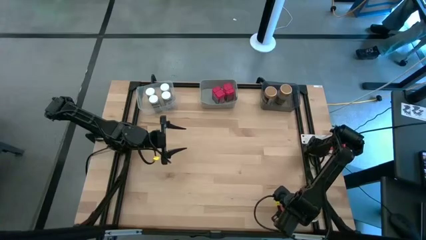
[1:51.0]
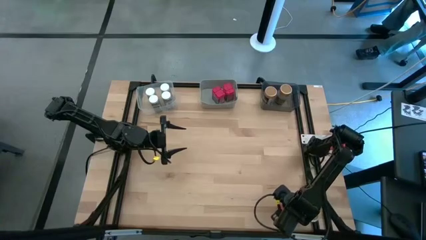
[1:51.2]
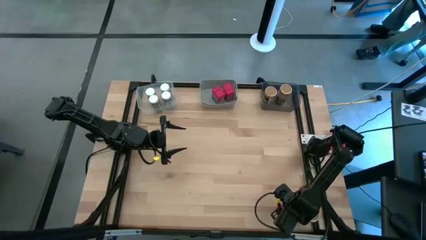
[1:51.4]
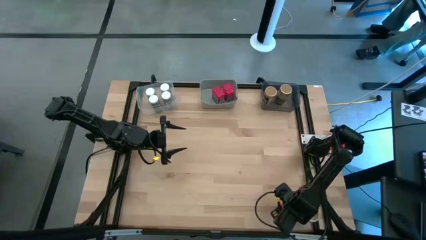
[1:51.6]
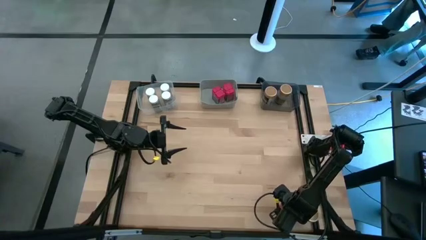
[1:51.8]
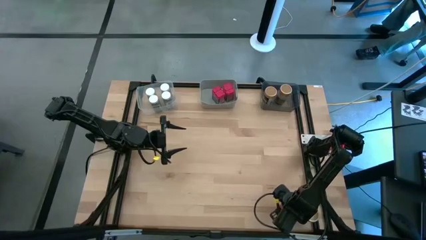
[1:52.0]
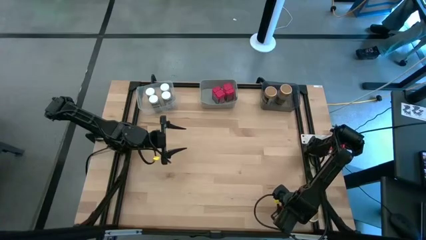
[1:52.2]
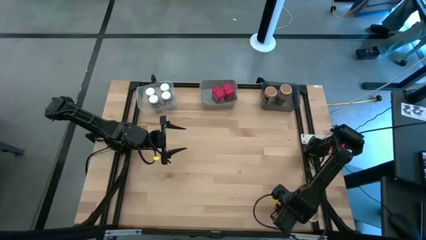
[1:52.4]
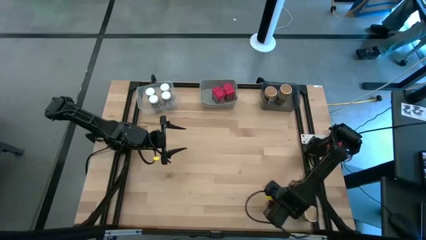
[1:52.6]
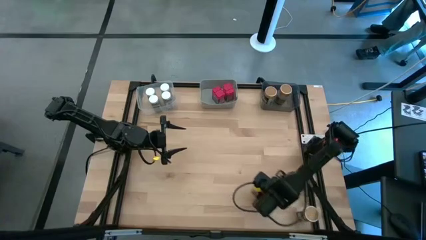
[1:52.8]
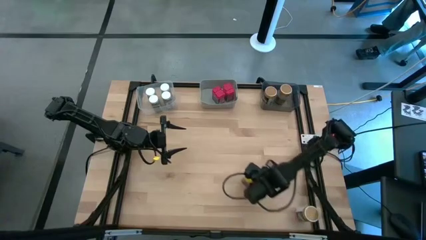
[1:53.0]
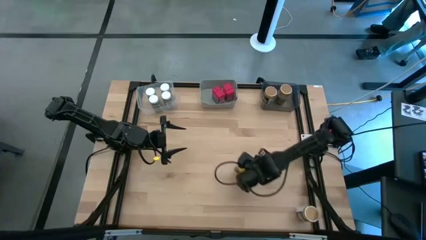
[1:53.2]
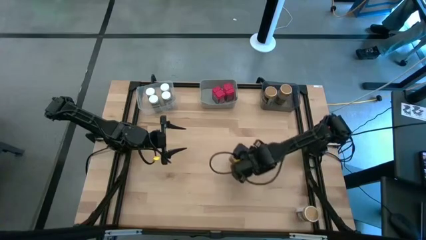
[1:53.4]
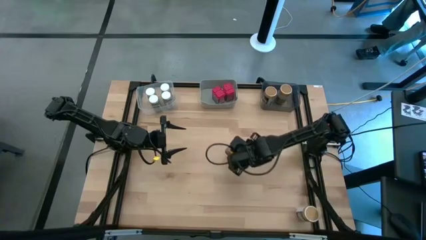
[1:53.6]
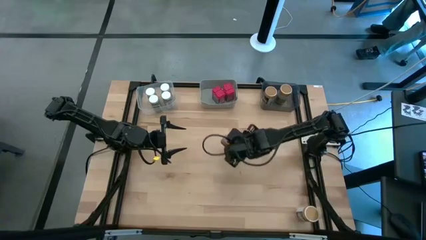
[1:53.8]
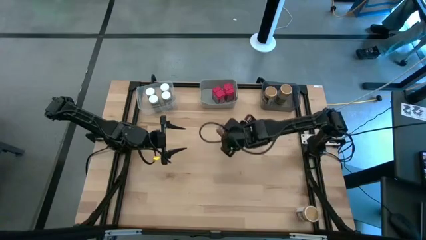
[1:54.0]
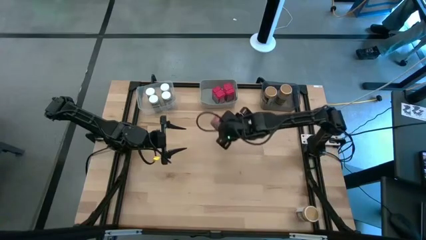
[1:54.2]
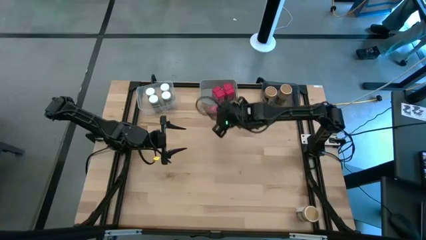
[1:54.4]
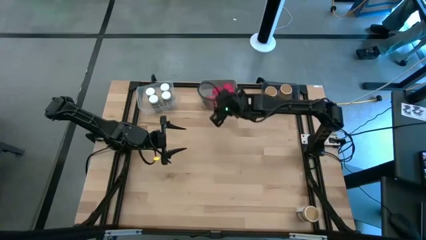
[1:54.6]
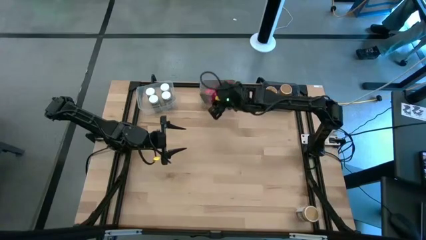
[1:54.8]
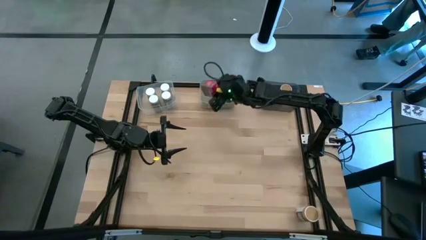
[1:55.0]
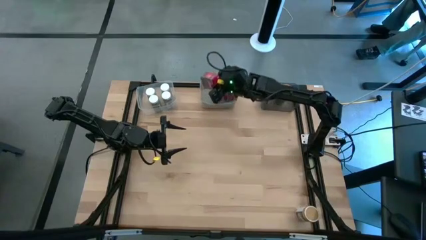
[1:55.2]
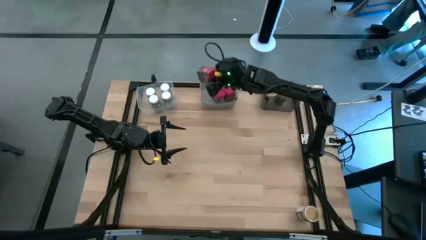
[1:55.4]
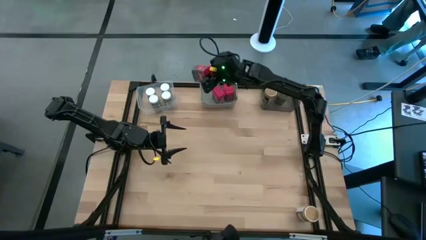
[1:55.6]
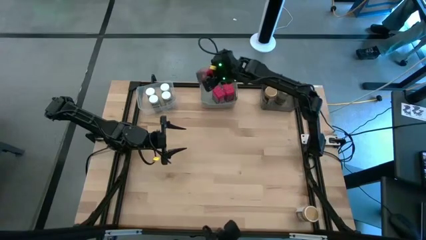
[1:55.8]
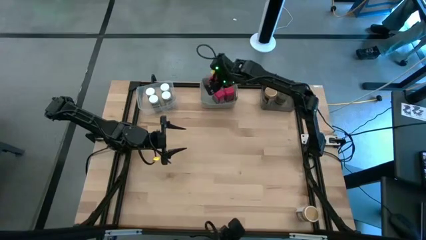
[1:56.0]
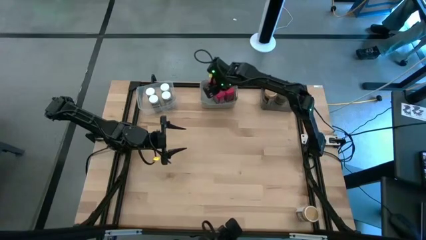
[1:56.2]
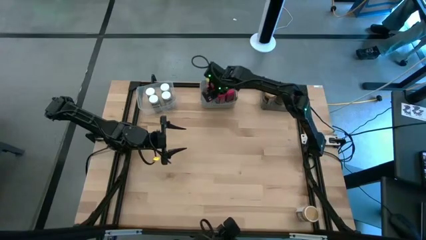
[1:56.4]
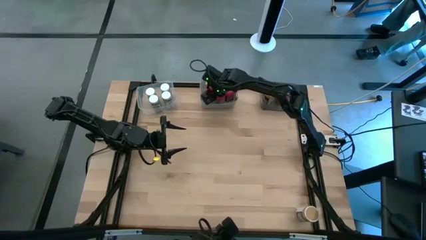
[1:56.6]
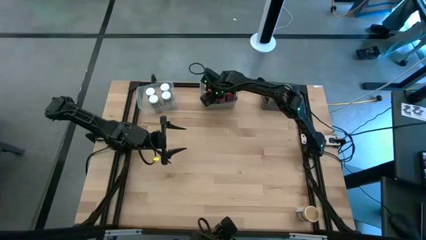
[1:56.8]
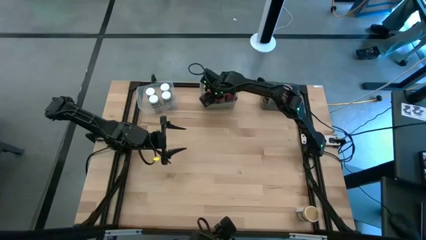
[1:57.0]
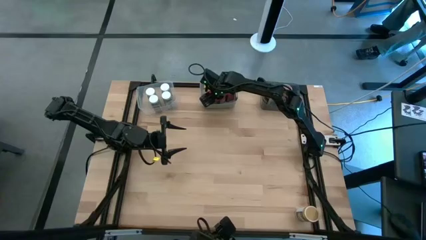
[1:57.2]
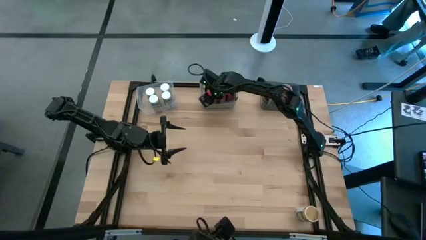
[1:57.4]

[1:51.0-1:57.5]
Task: Sort spices by type
Put the red seasoning can into the gray bin

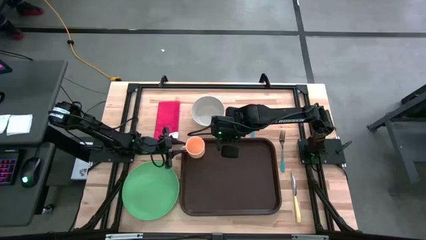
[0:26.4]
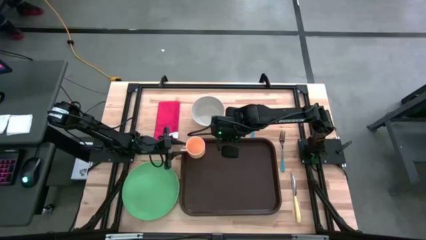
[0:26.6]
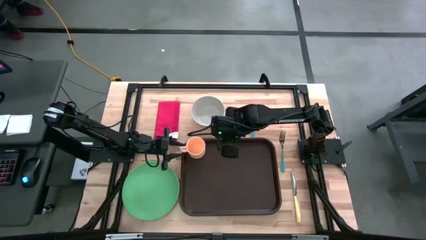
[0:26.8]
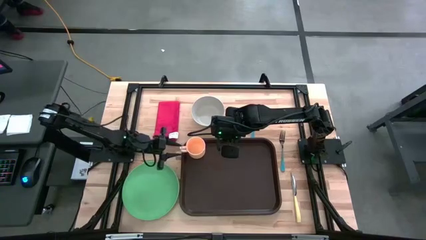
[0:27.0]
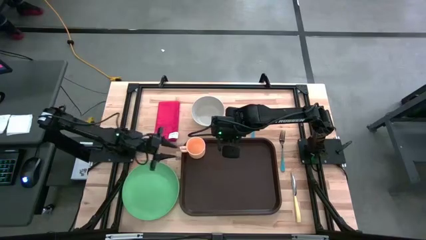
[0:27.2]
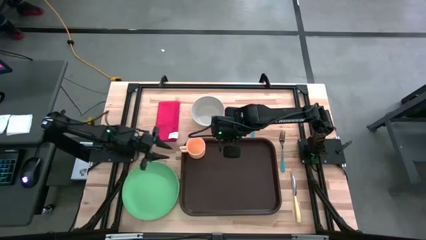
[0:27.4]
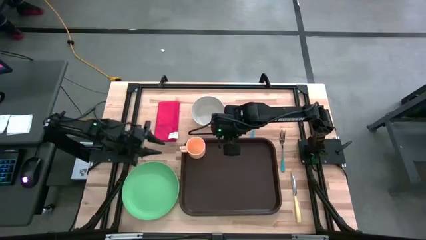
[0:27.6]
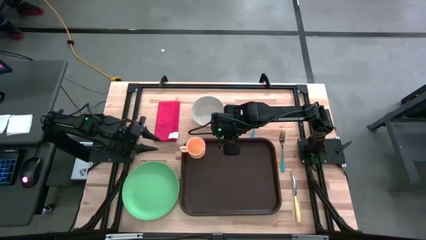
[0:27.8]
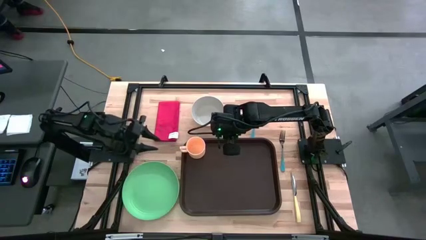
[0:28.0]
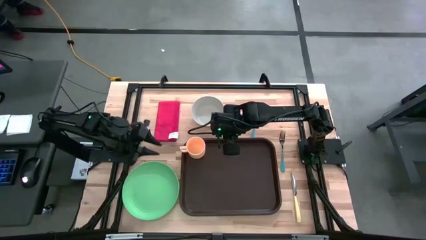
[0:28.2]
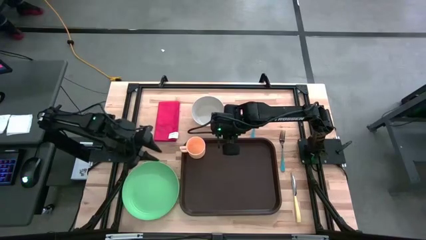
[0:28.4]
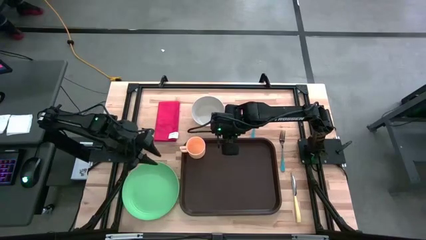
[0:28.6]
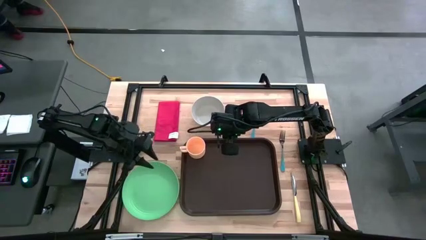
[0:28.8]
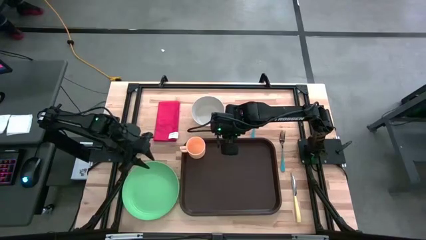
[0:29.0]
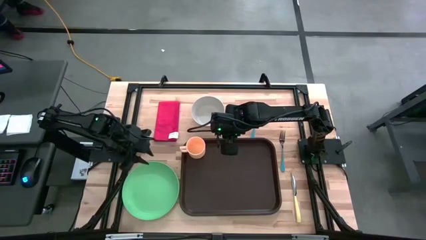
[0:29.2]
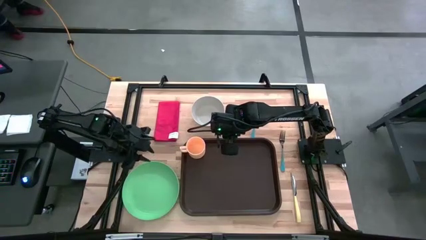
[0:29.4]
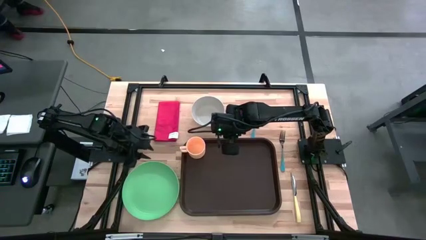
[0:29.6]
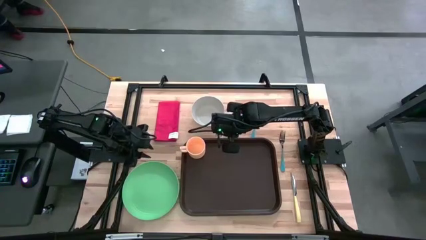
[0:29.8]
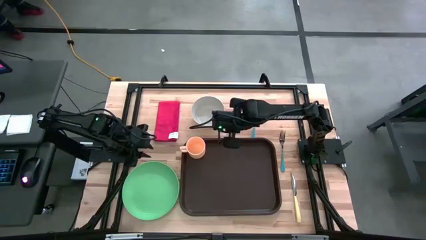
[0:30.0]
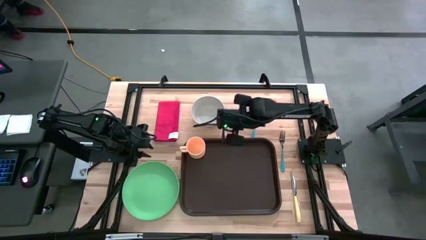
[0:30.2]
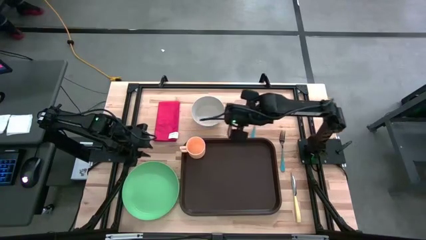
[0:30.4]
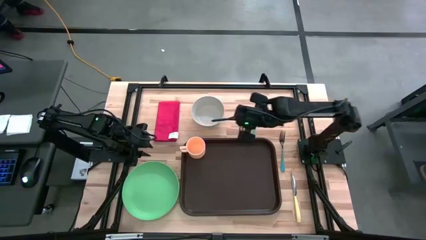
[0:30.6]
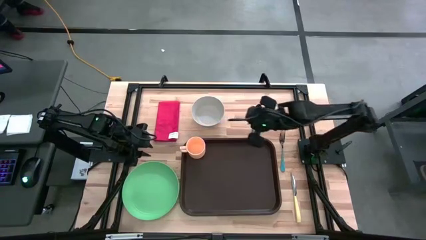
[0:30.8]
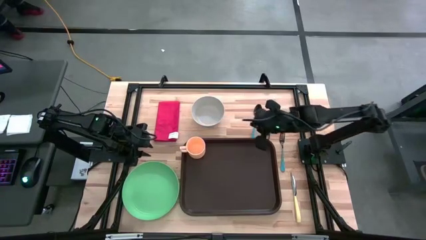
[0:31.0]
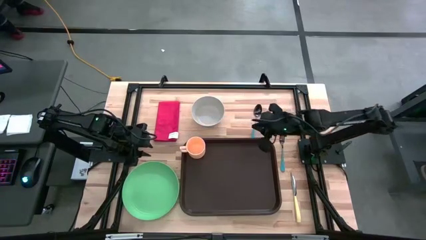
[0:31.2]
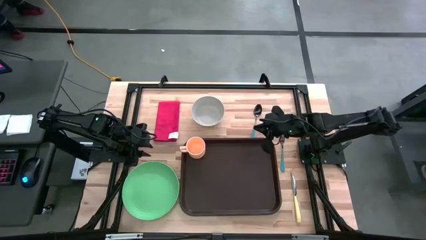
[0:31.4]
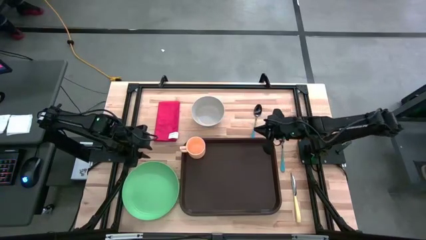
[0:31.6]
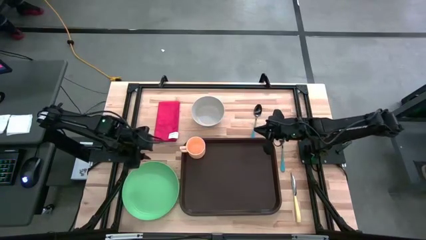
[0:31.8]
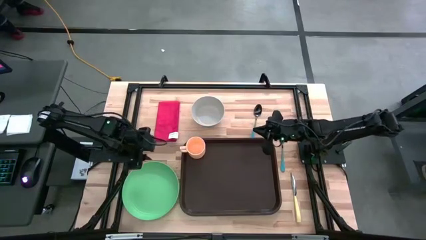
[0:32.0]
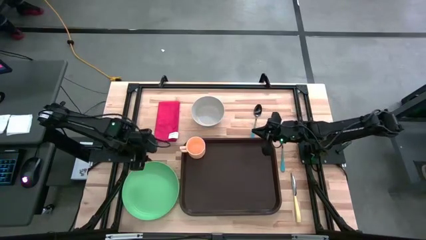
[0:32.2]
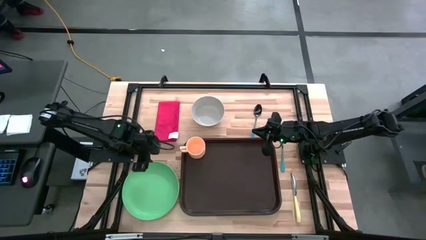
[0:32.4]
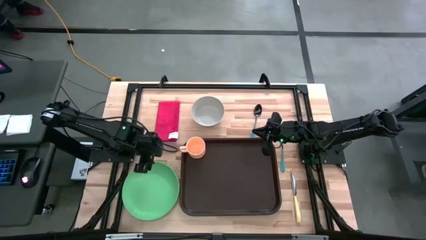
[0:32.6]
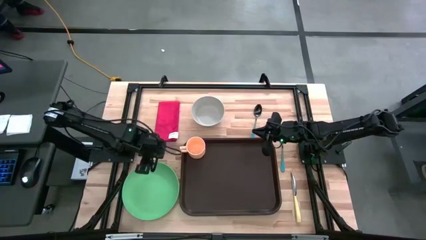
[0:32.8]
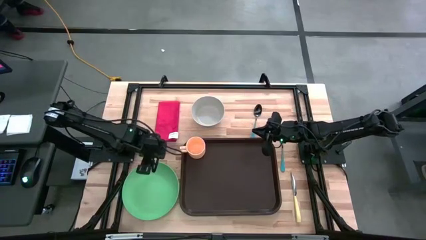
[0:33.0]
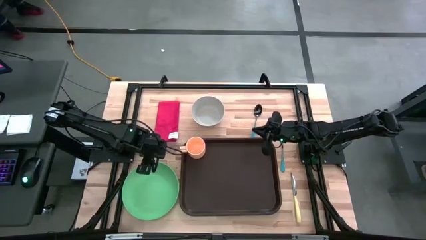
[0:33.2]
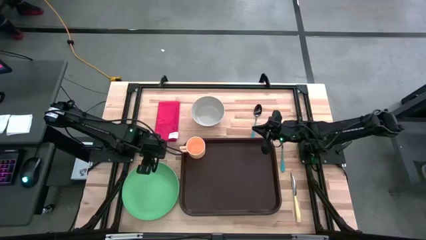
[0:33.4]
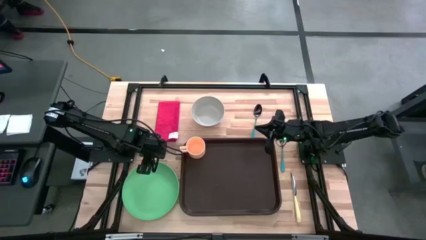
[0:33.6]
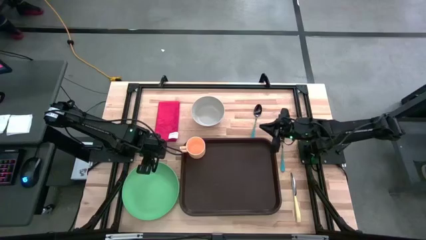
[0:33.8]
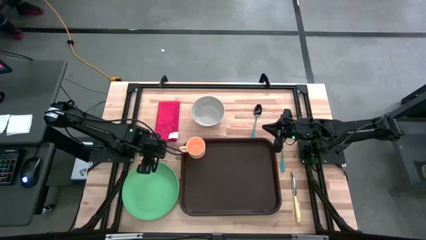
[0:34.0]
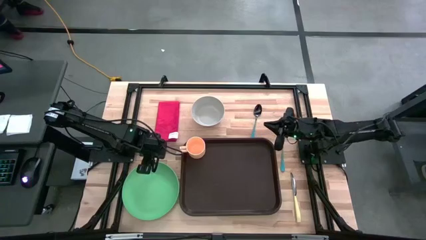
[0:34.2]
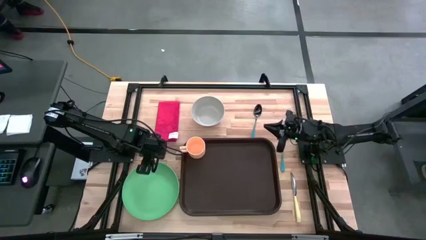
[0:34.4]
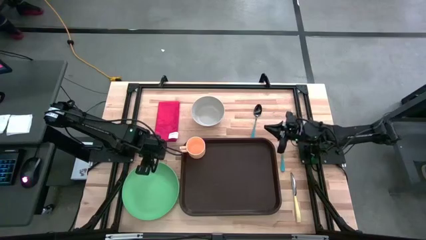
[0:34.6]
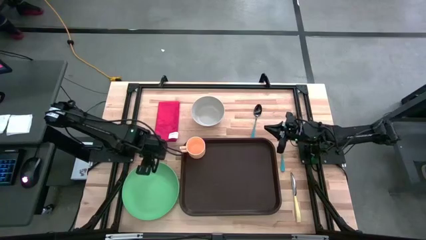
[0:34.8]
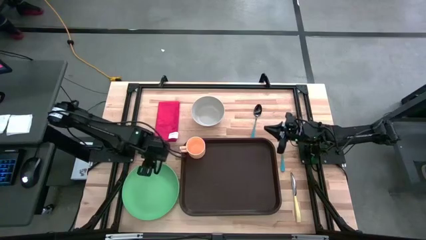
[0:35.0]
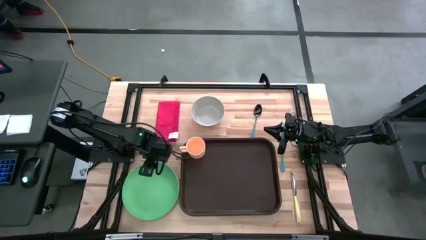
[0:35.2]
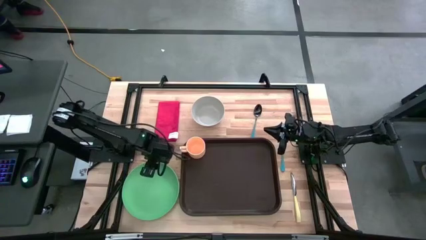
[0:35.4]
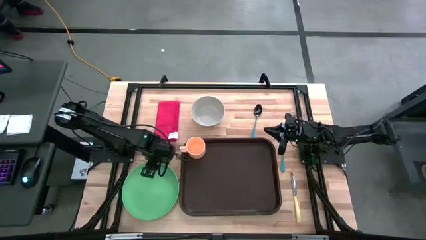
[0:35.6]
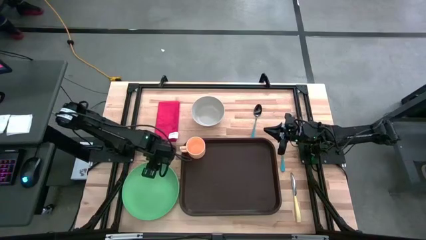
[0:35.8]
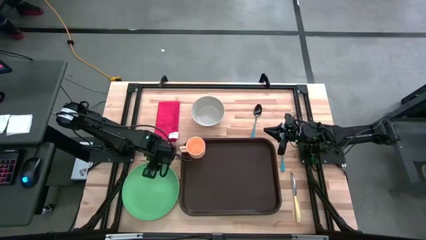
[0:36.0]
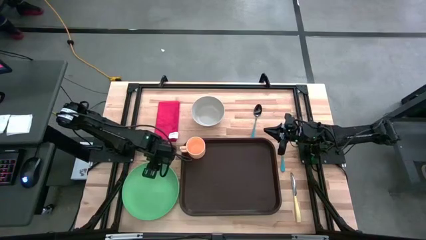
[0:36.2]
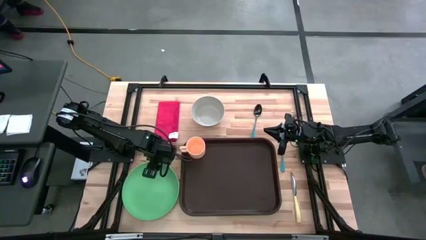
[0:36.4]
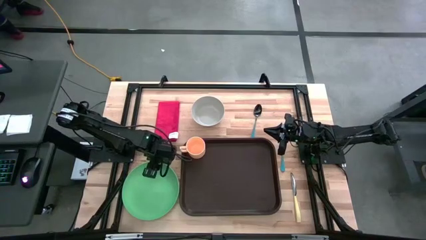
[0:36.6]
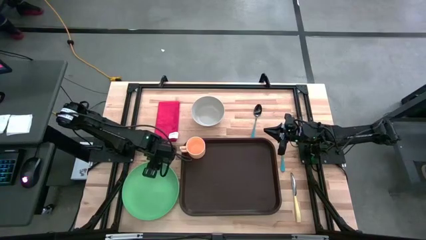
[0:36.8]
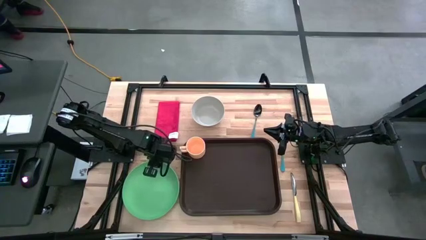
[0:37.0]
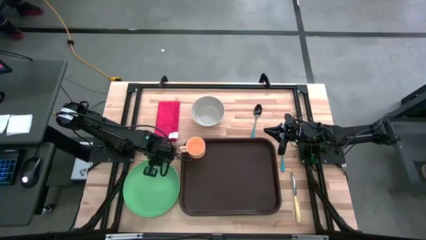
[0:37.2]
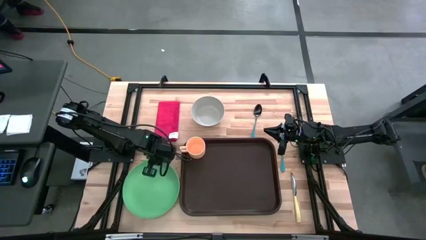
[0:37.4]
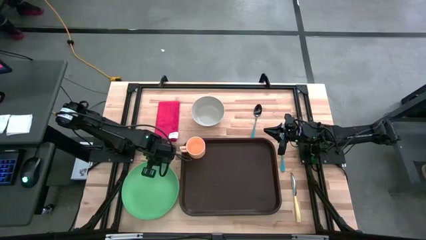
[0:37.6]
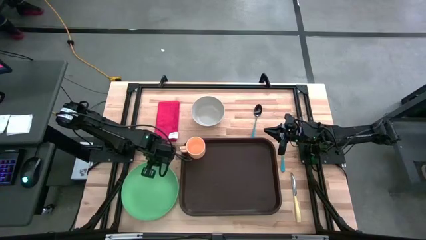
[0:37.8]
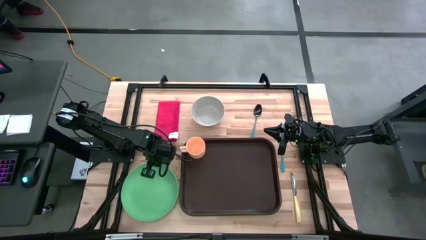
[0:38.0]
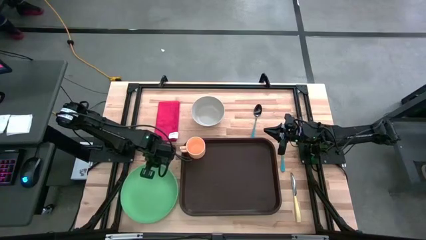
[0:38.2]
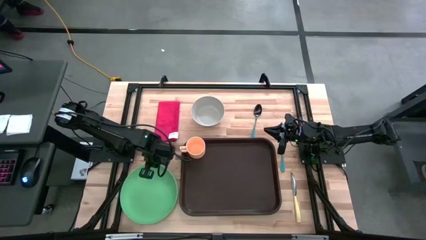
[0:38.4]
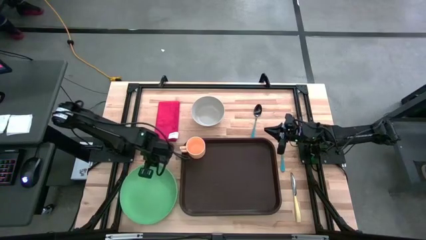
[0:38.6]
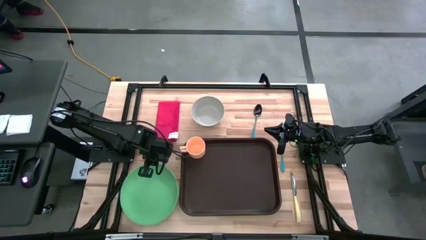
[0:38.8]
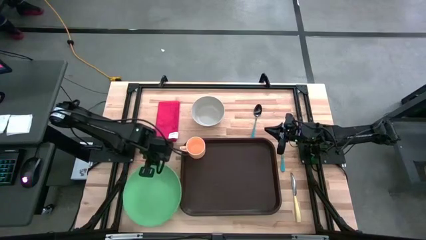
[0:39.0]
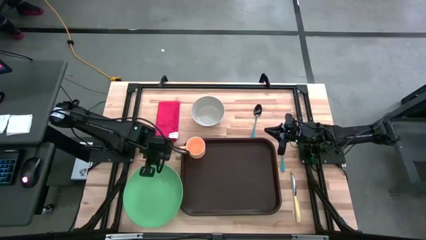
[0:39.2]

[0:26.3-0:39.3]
Task: Set up tray
Put the green plate to the bottom right of the yellow cup on the brown serving tray
